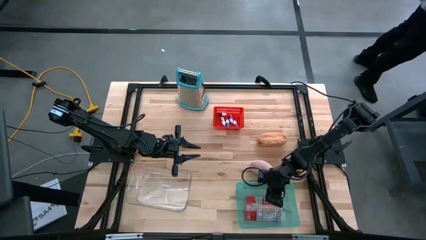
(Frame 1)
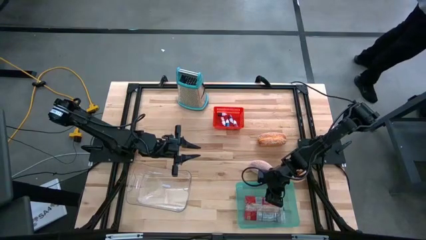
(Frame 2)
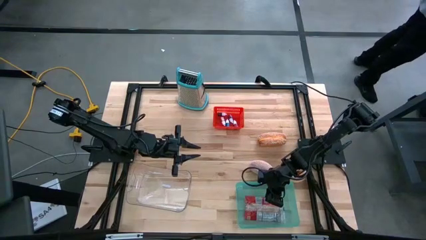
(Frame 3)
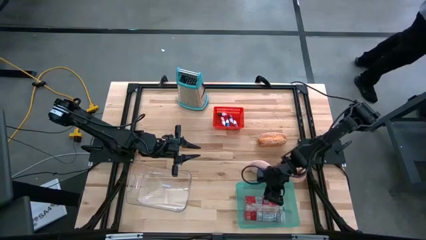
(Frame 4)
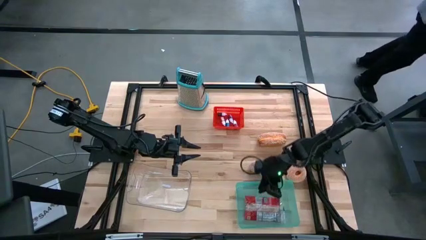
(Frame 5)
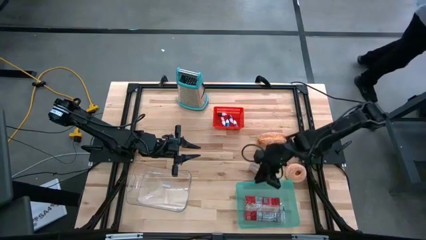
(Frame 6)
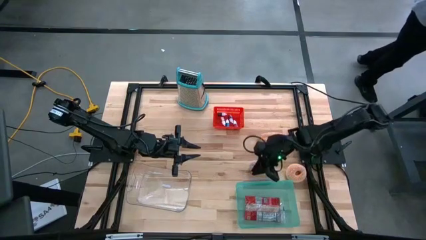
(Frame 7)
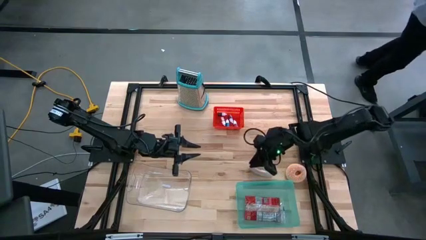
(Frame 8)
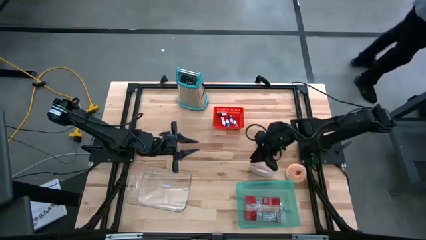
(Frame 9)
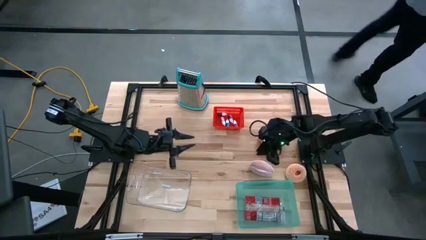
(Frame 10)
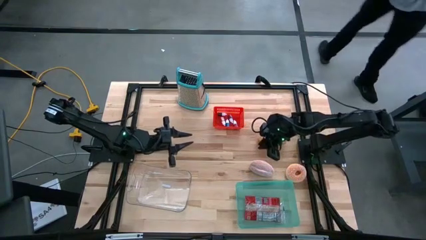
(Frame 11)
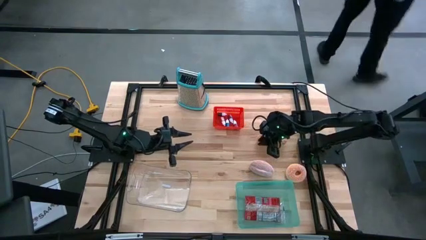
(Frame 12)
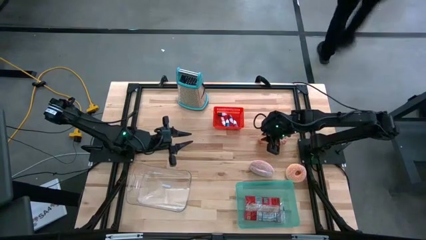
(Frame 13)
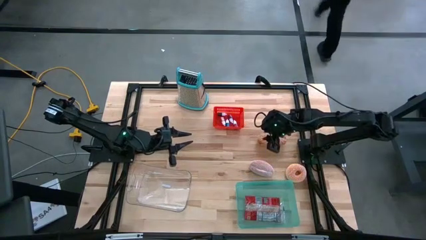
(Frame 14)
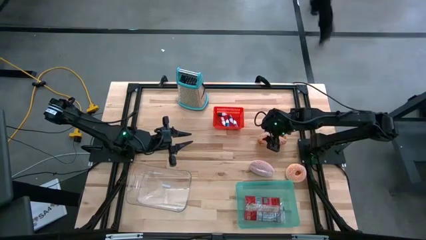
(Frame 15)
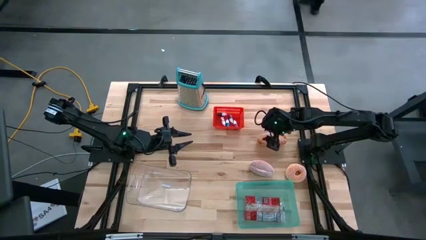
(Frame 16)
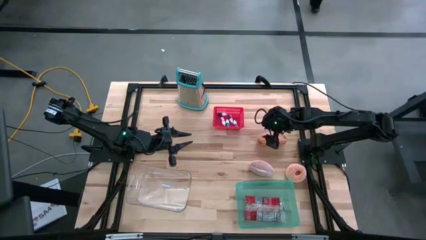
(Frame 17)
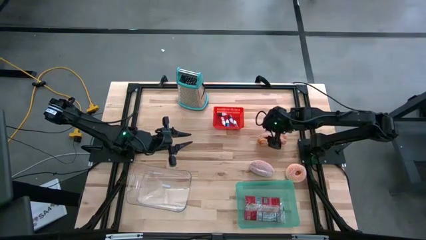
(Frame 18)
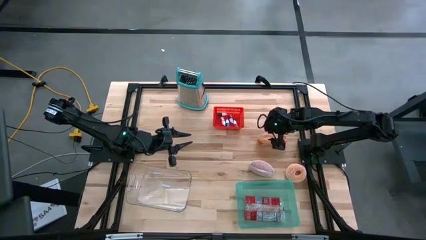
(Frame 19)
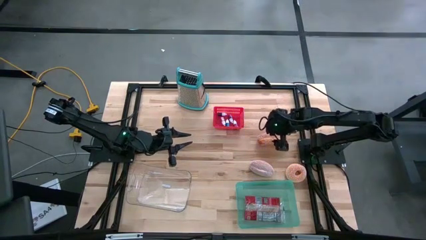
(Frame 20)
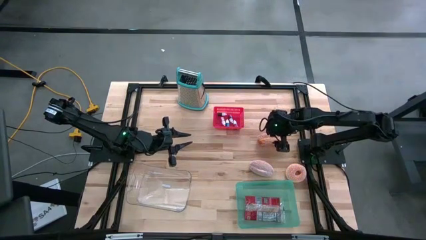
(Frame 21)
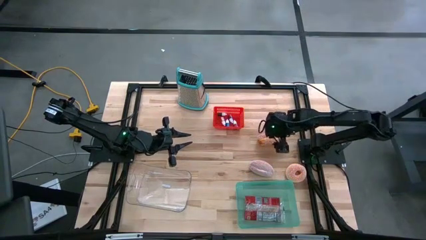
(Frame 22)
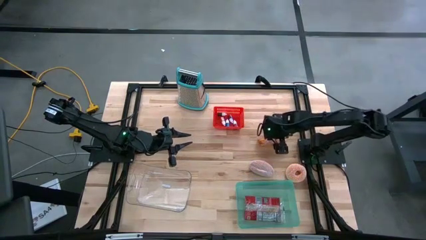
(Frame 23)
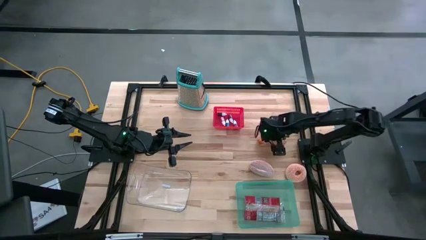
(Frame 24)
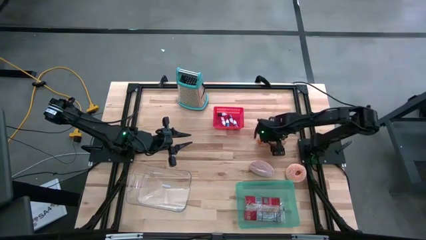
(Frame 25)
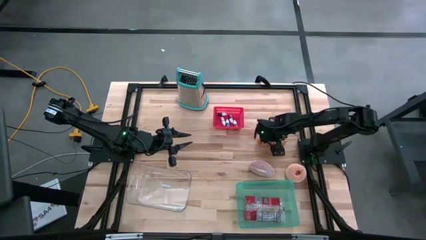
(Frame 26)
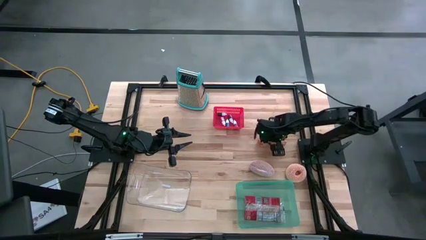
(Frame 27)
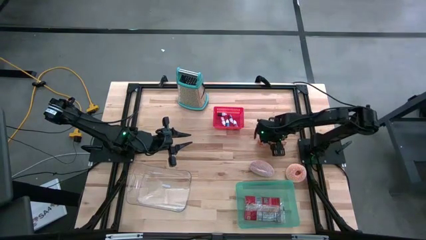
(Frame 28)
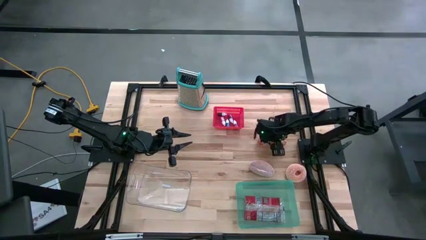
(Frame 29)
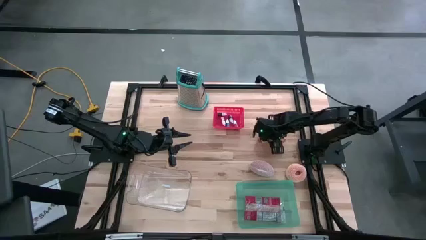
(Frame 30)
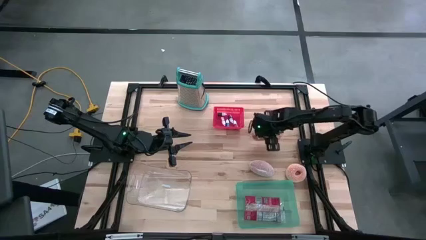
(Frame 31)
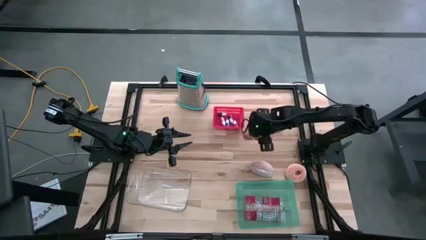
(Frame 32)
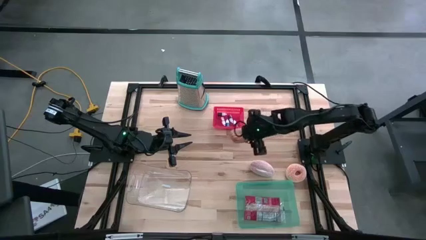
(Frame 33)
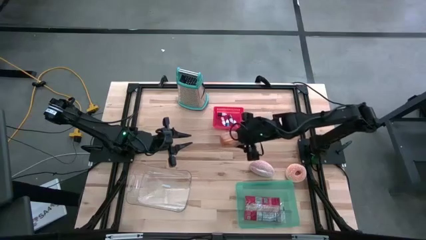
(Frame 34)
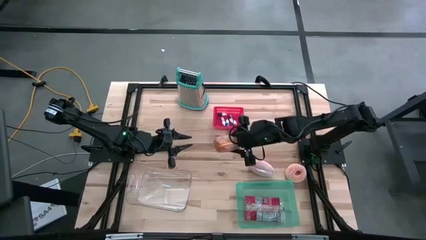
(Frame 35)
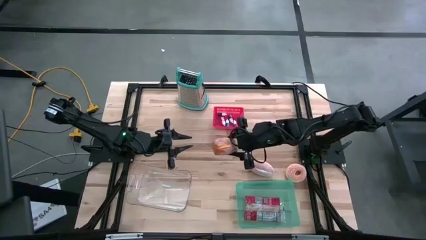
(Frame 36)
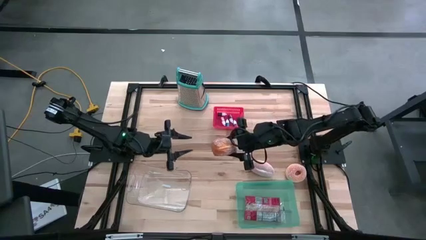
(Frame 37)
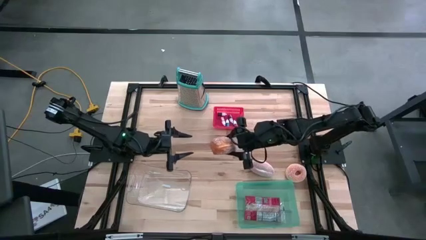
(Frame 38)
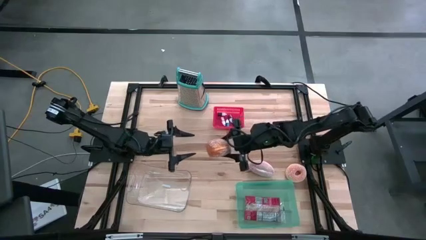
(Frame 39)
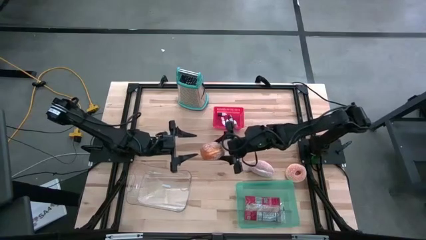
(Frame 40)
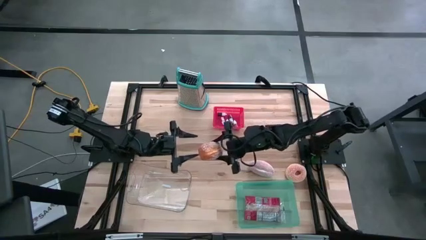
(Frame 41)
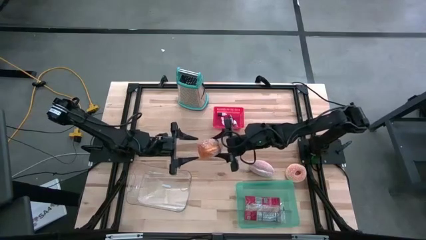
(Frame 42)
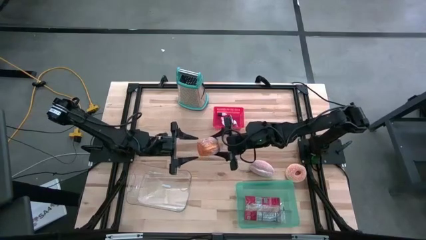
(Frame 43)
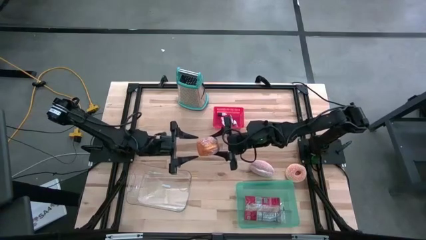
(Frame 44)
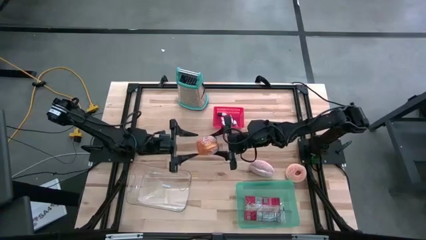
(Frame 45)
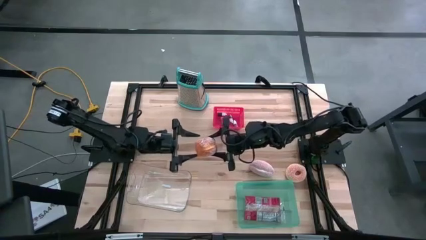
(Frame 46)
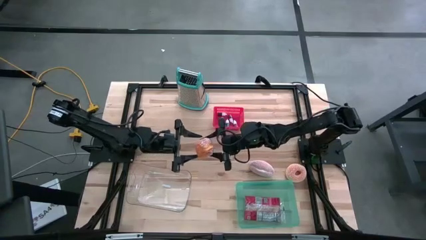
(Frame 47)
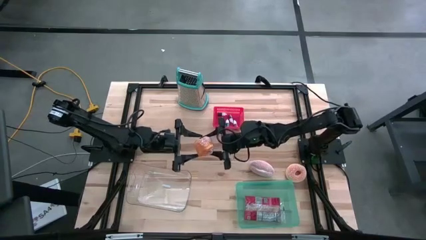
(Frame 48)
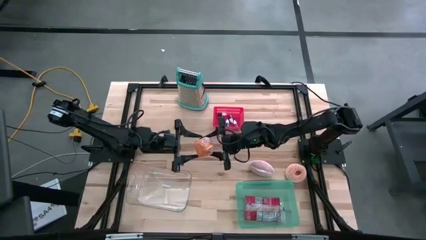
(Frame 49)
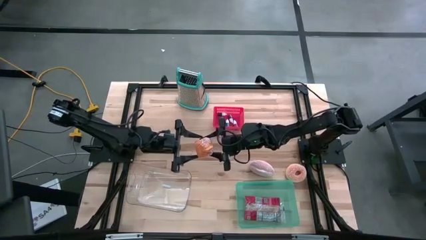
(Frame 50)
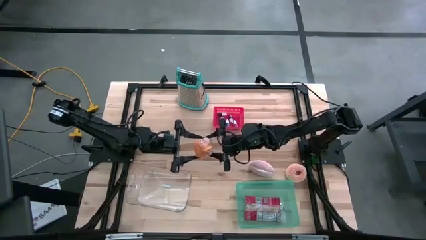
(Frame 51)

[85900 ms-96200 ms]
Put the bread into the transparent bin
